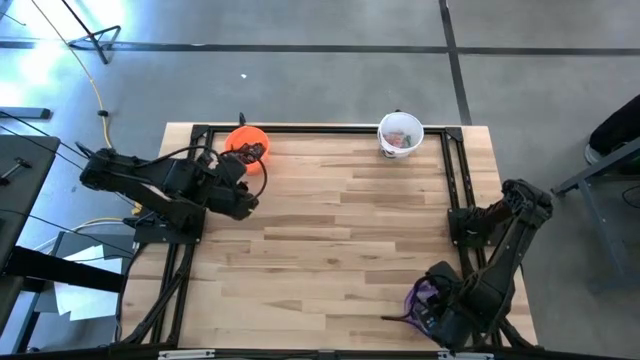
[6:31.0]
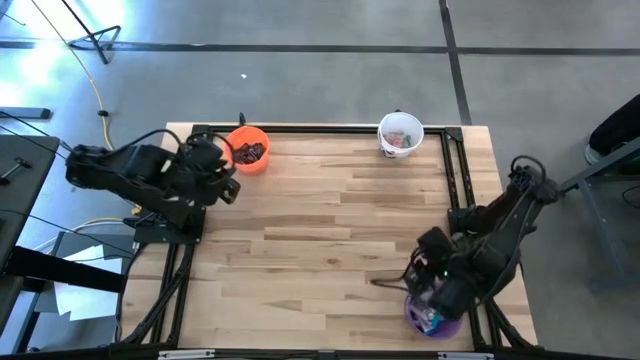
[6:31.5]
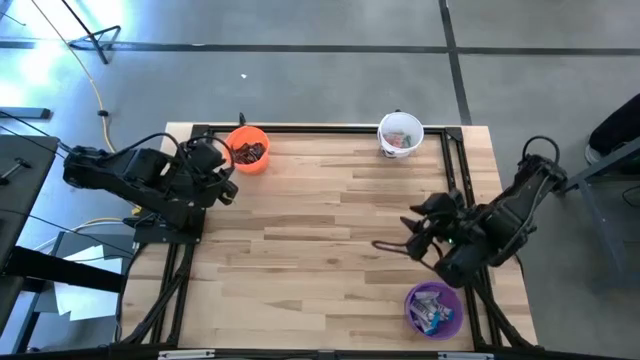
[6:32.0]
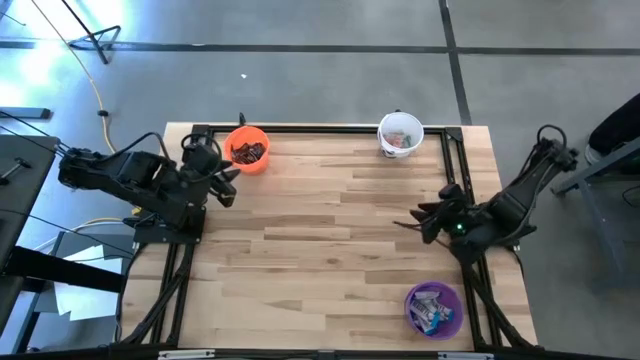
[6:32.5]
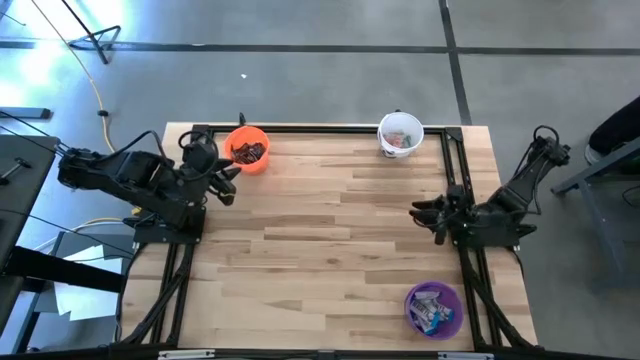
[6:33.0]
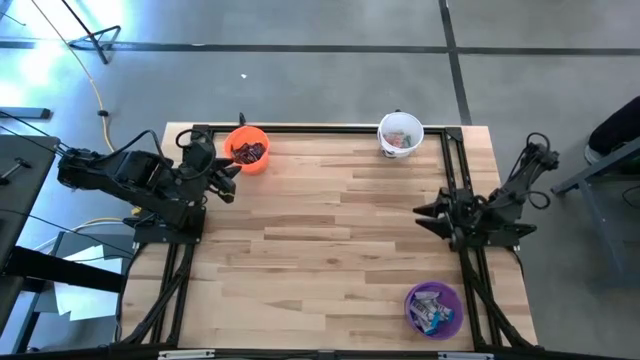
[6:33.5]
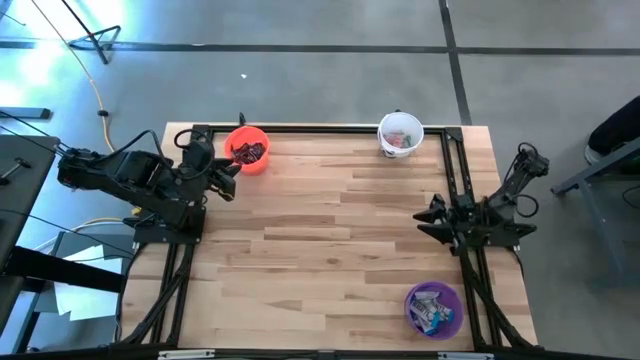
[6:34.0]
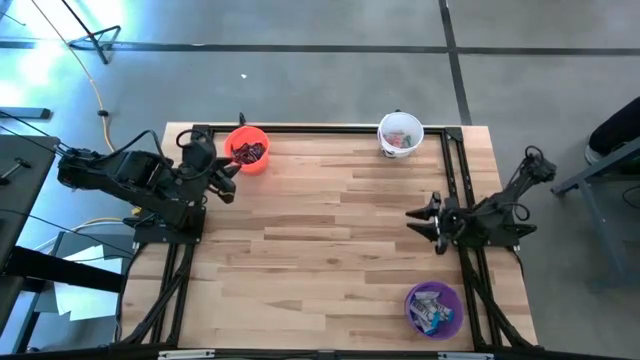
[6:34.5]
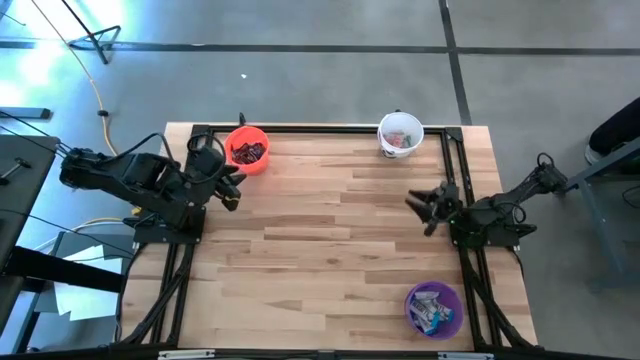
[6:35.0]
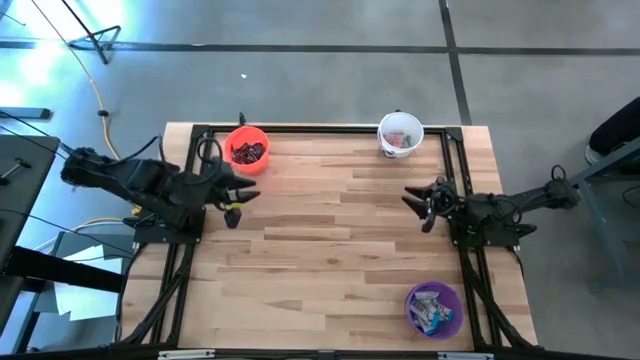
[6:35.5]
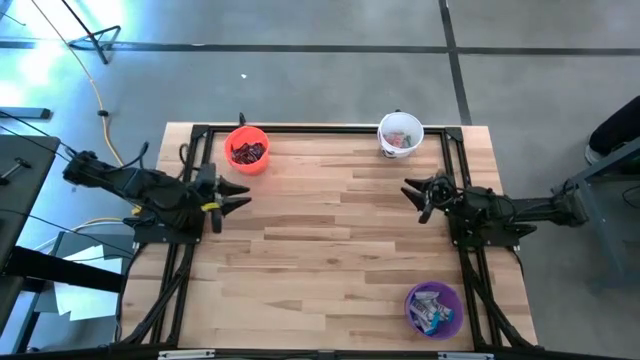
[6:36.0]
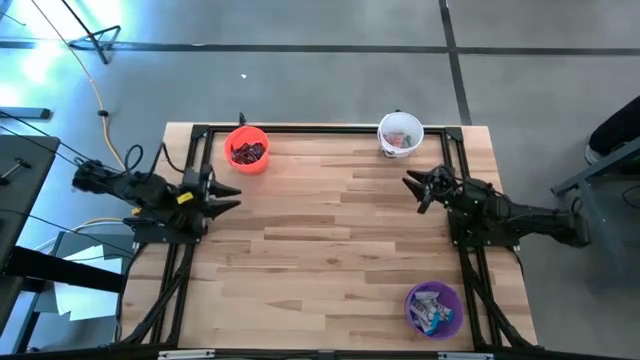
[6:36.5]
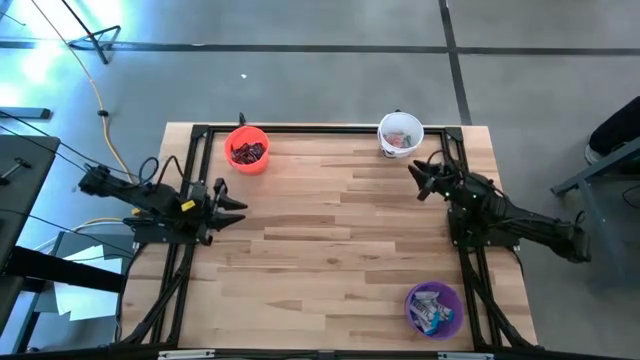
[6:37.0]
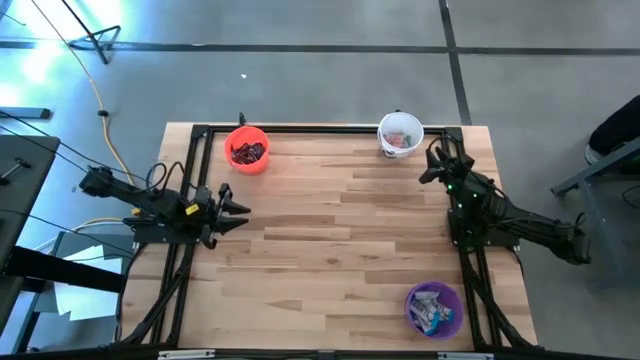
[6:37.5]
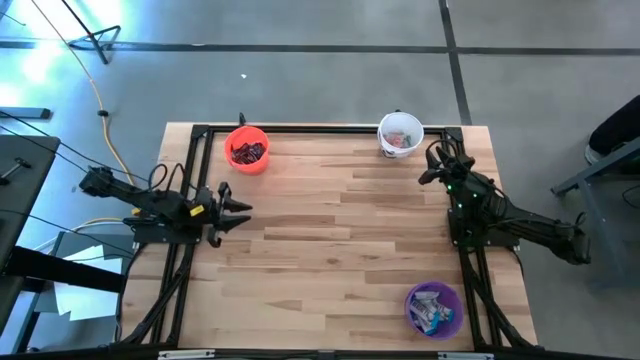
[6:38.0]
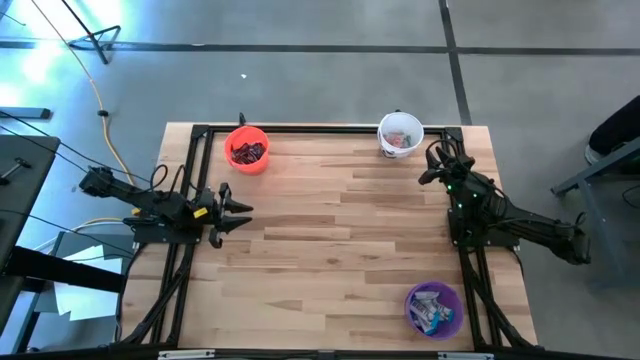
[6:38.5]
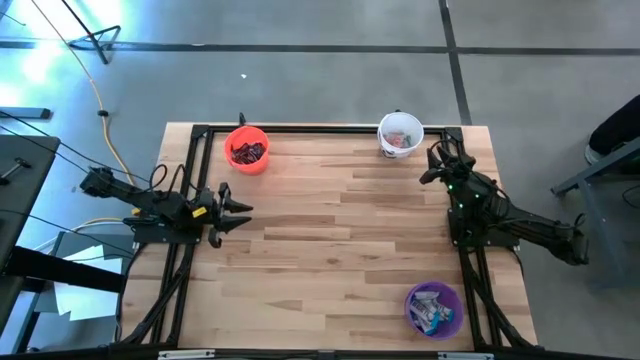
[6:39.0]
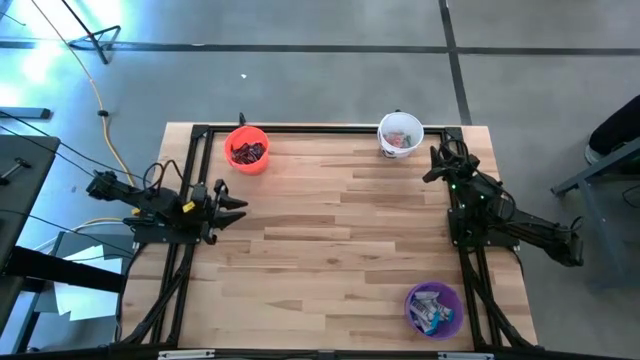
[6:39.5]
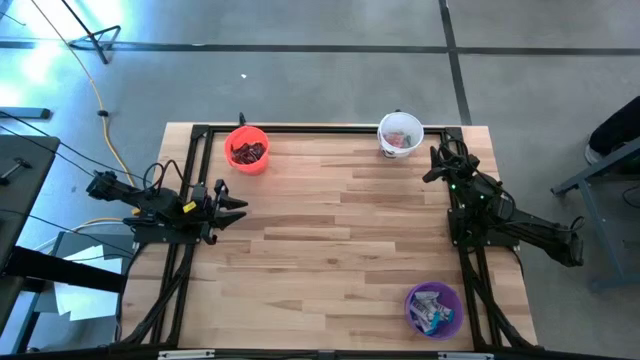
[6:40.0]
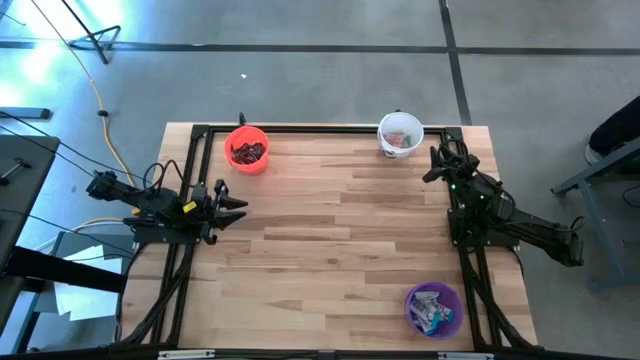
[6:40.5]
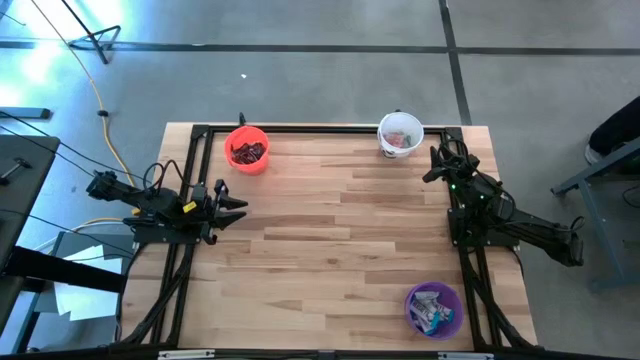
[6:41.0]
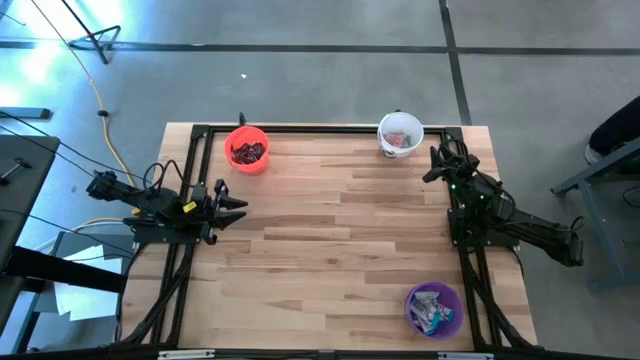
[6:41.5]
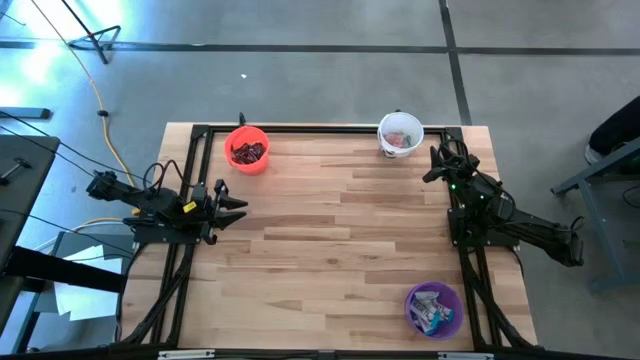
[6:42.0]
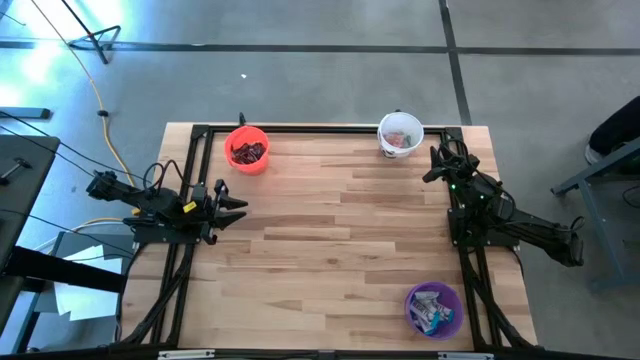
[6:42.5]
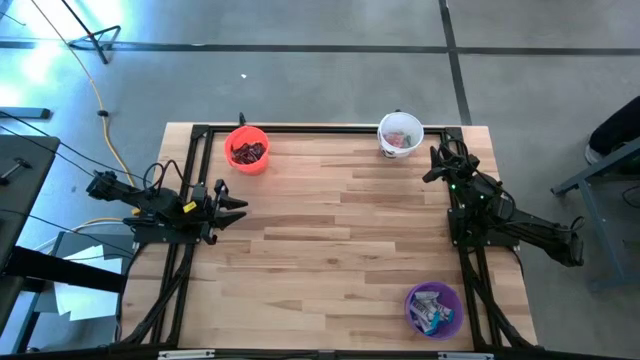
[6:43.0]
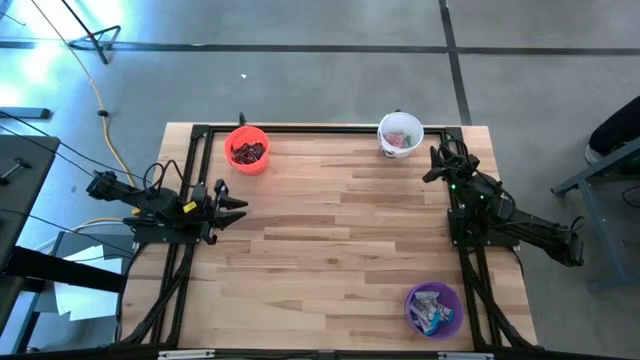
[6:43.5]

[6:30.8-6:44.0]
Task: Sort candy
Return to Home Position

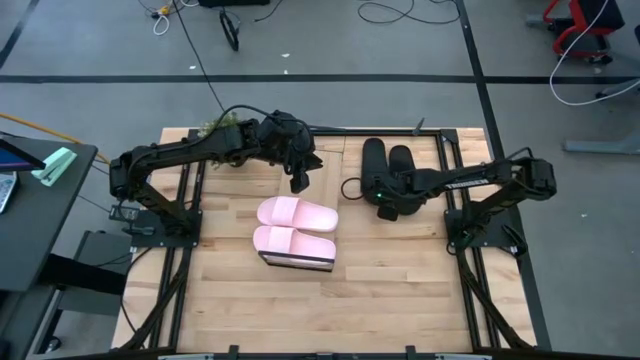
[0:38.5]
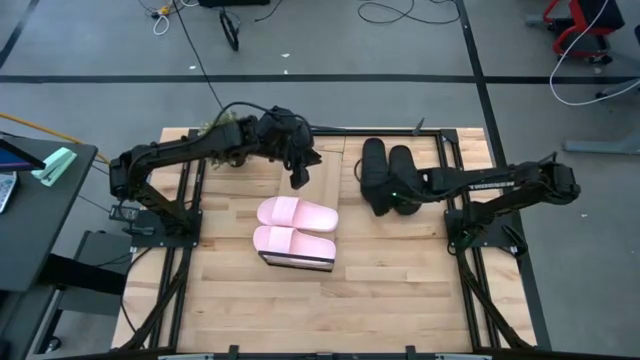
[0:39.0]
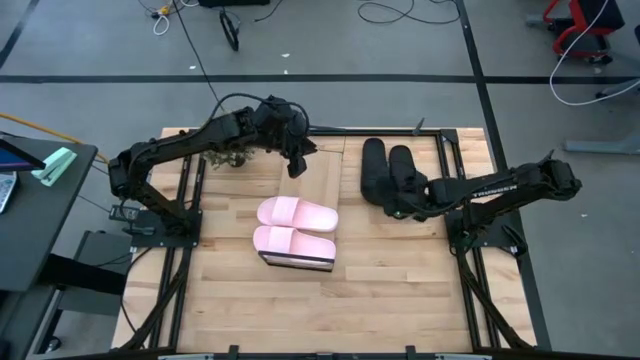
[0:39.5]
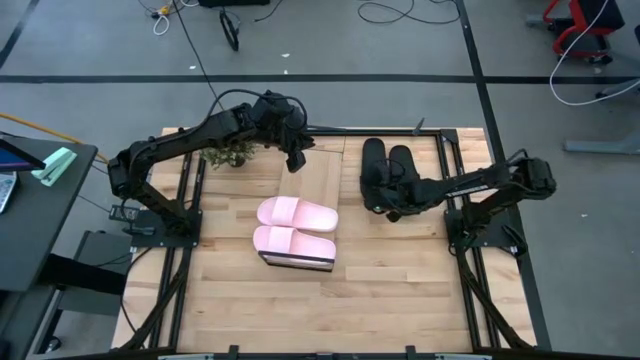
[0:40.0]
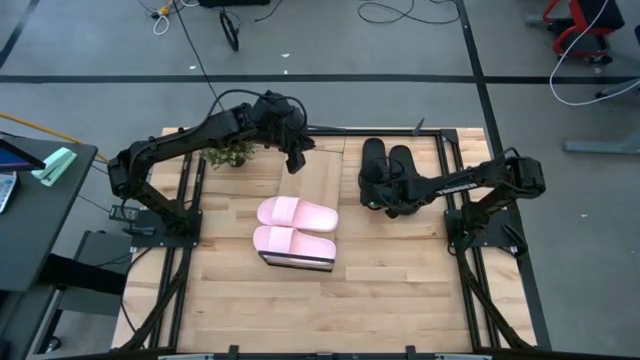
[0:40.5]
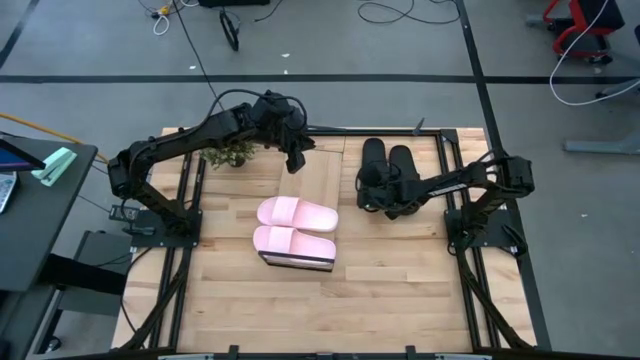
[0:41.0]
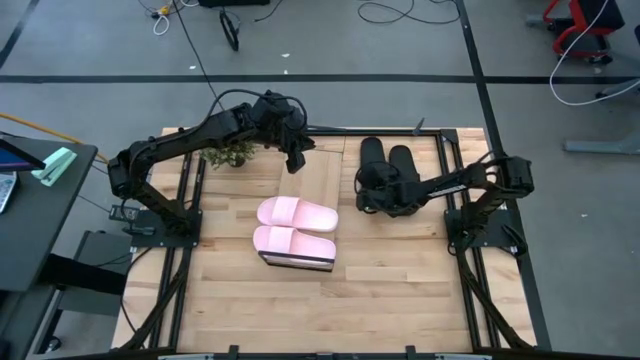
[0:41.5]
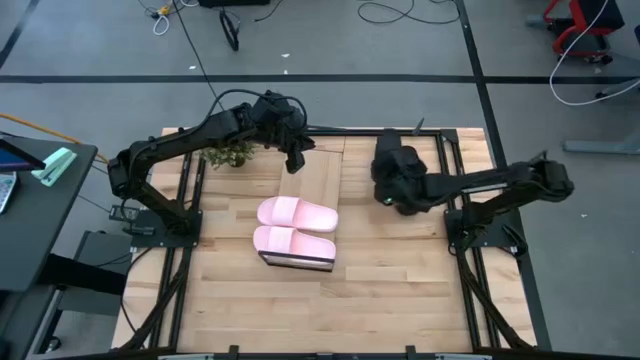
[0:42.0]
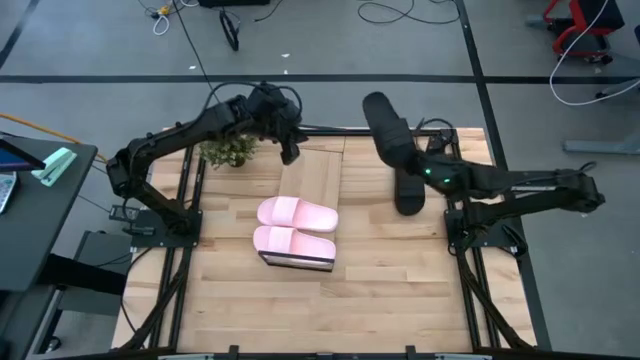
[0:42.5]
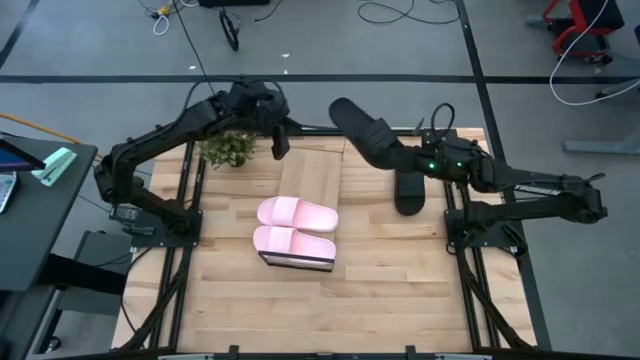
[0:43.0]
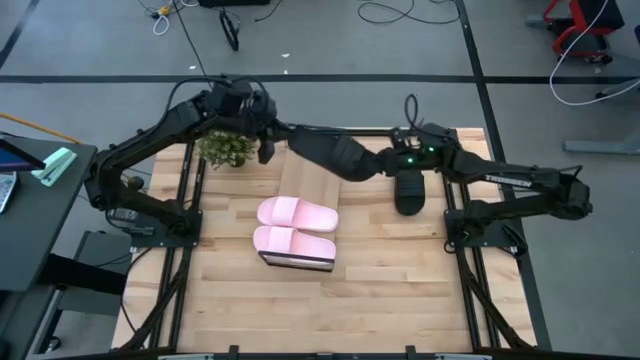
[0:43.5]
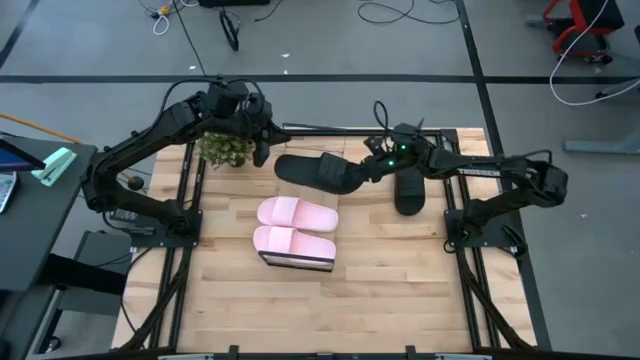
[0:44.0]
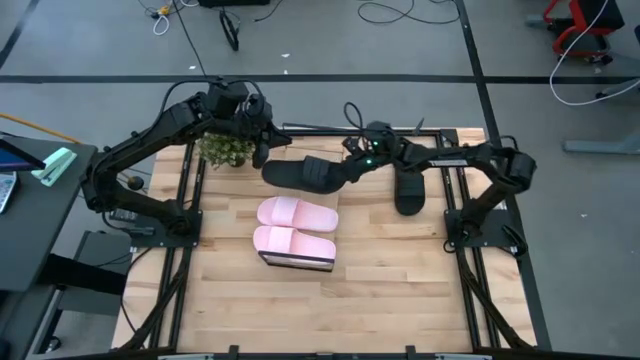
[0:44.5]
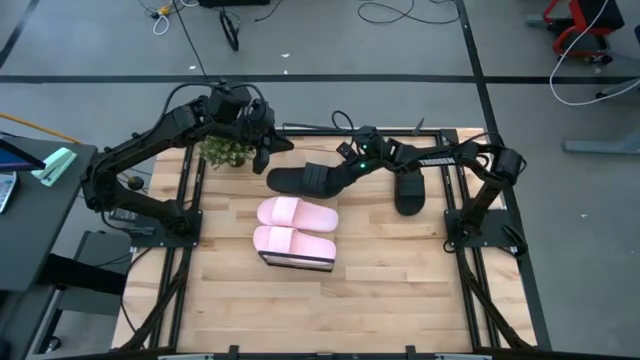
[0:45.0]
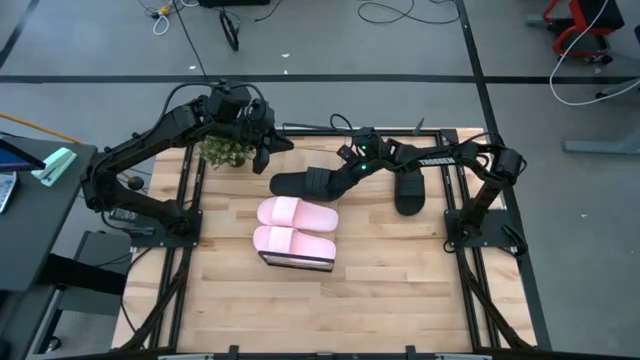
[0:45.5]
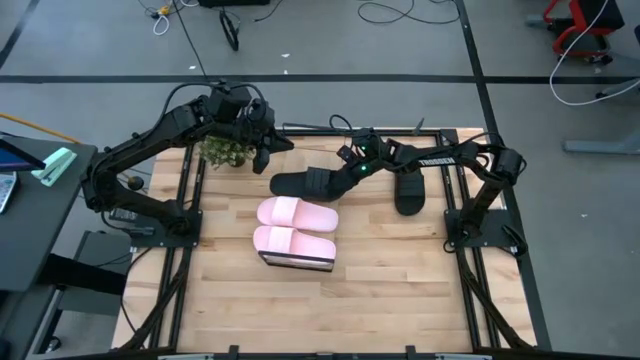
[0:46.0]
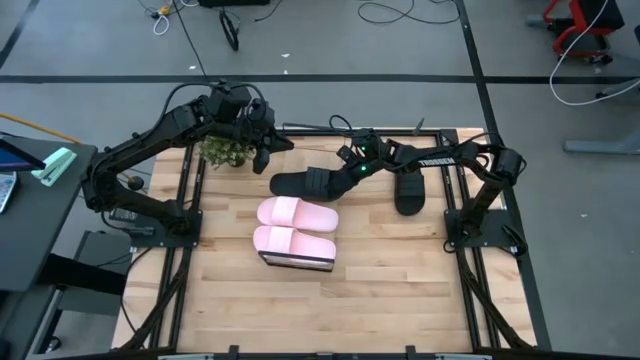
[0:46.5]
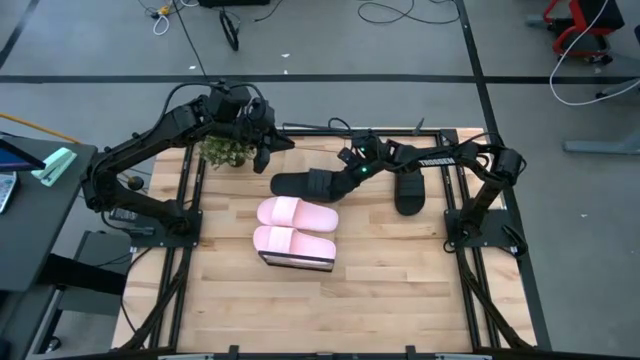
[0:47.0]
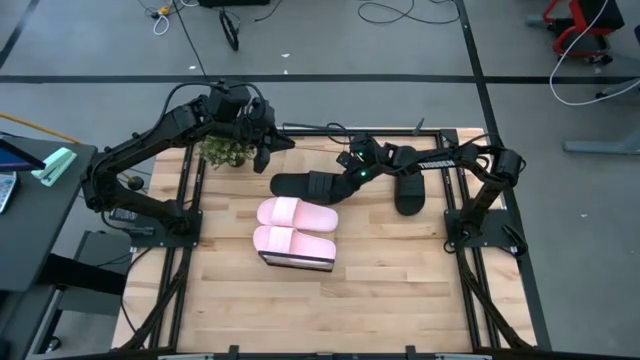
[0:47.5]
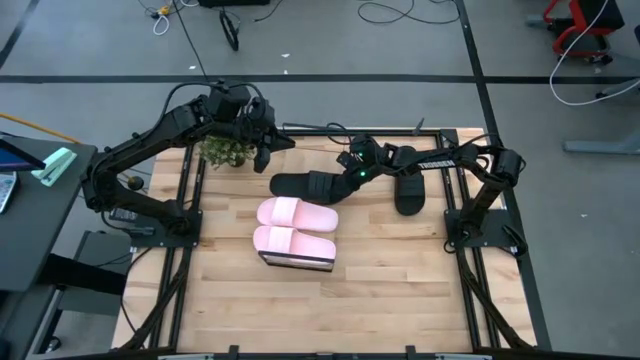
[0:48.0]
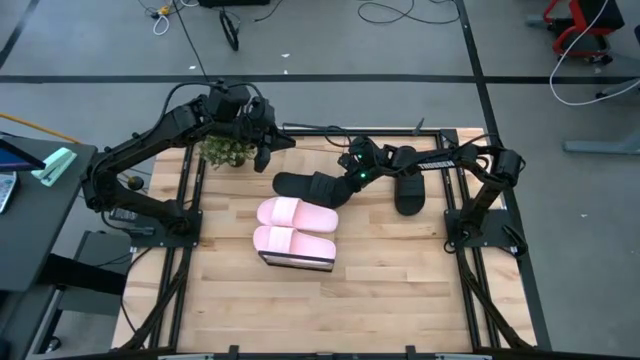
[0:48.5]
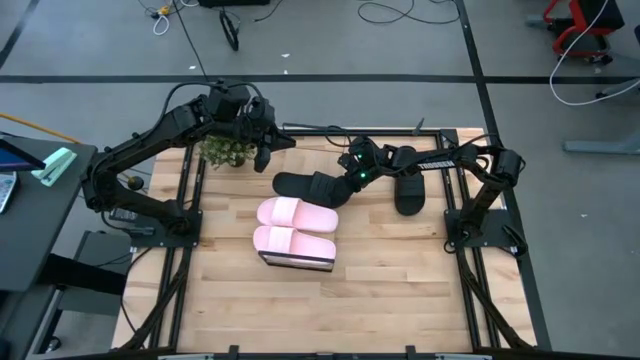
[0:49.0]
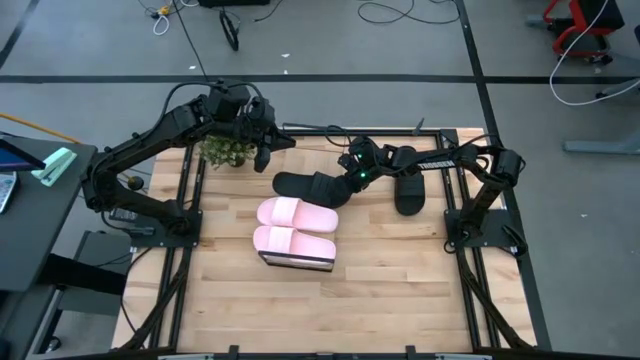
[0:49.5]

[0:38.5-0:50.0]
Task: Pick and place slides into the shelf
Put the left black slides on the shelf
